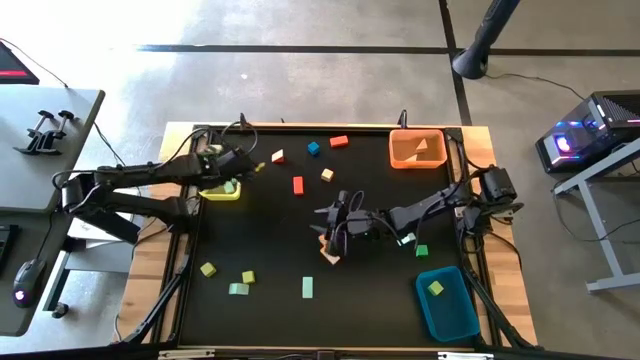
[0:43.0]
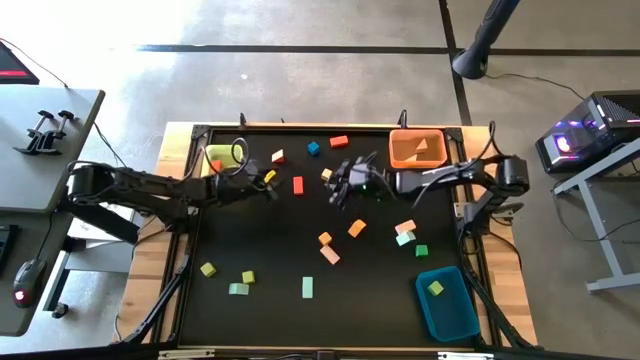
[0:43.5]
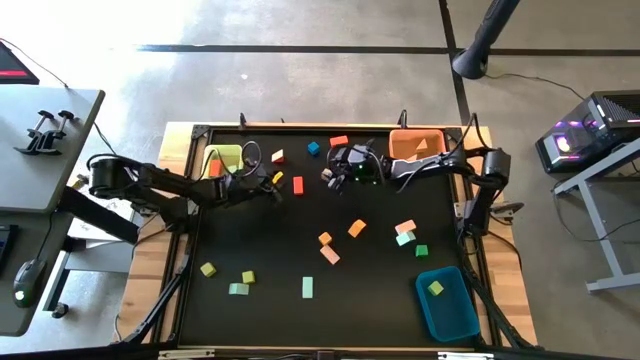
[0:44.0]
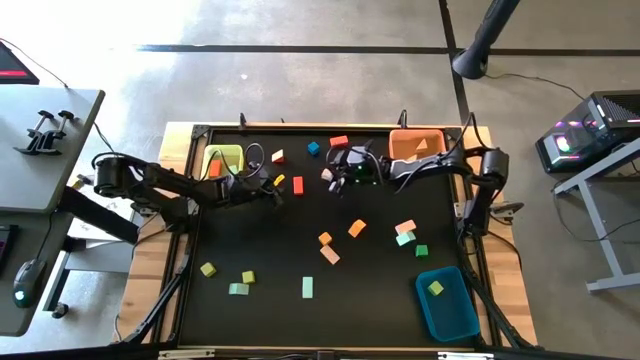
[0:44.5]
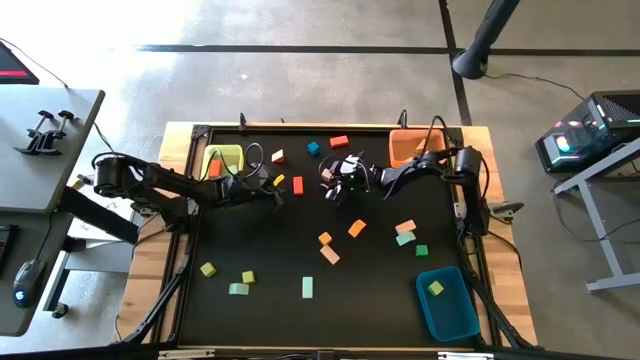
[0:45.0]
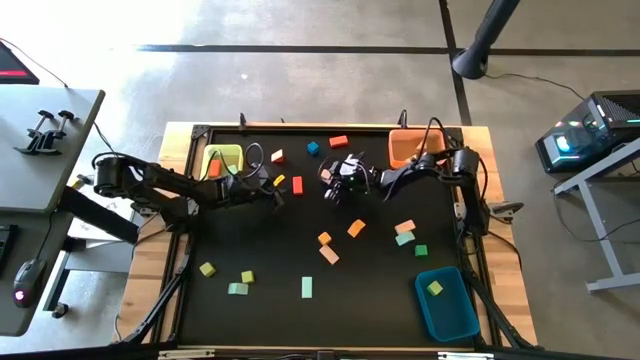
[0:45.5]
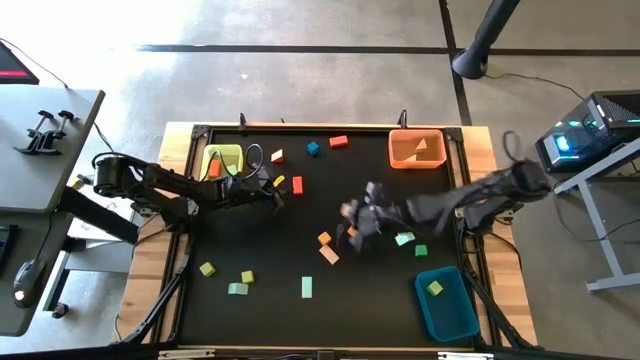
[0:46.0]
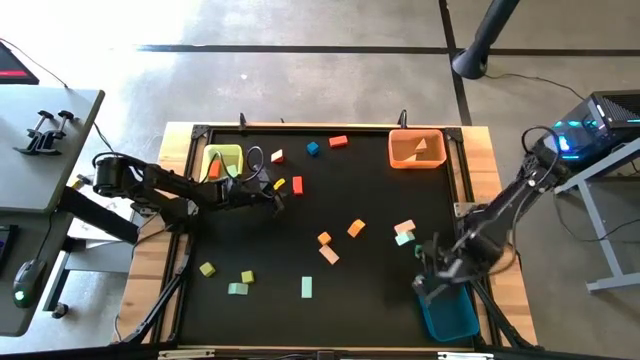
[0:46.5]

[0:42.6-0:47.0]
Task: Sort blocks by size
Put the light orange square block into the blue bin

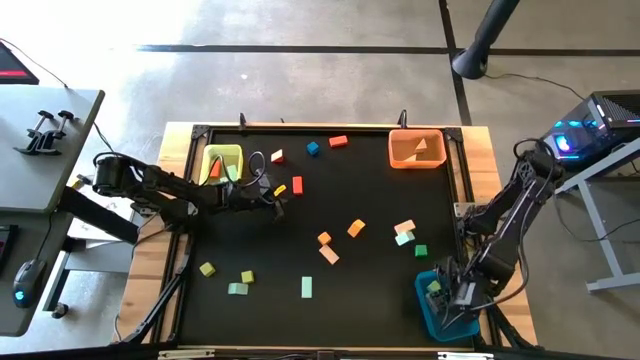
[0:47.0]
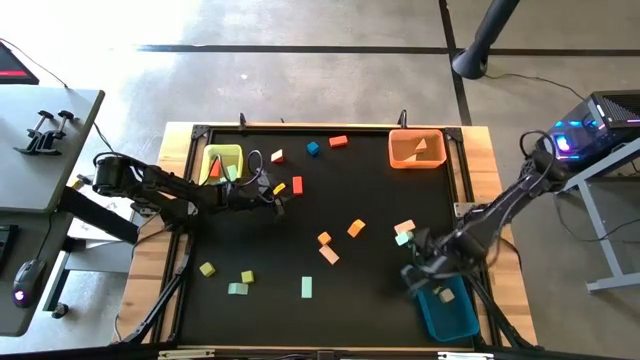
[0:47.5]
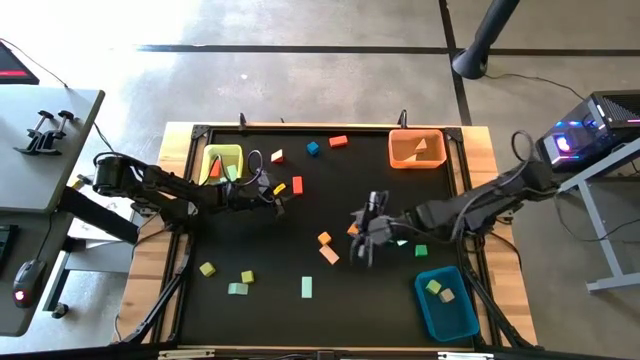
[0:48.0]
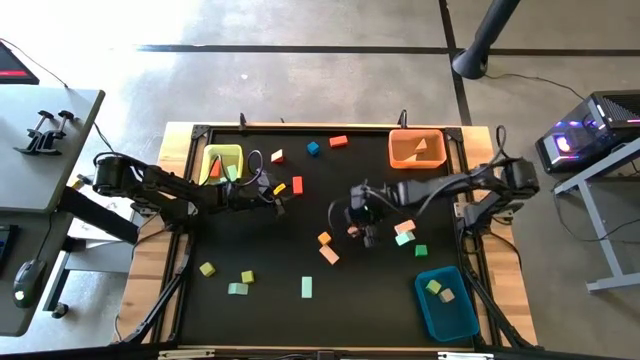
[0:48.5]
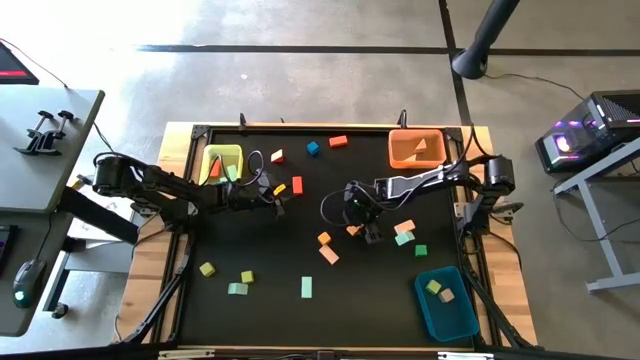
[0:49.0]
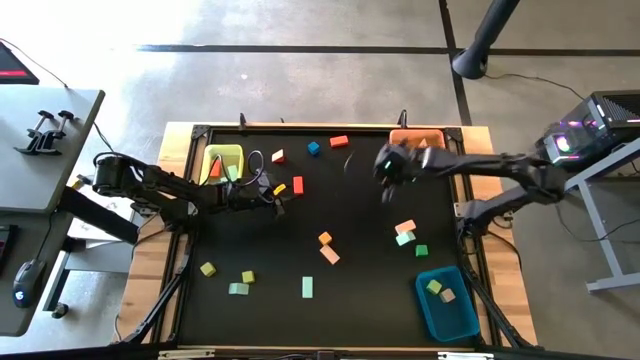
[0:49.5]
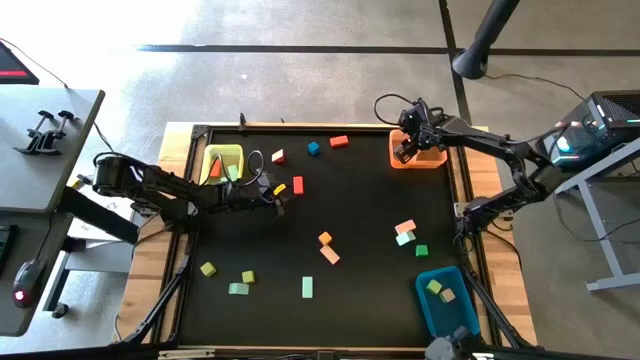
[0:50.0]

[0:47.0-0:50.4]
Put the orange triangular block into the orange bin

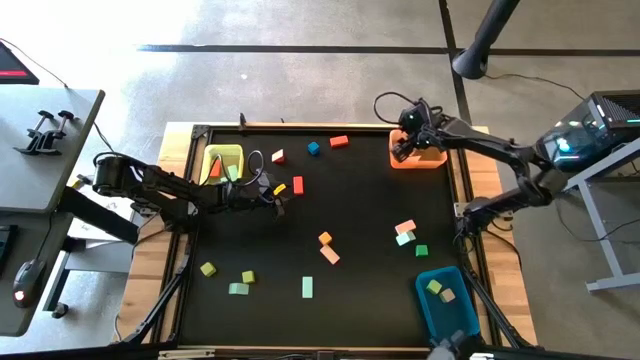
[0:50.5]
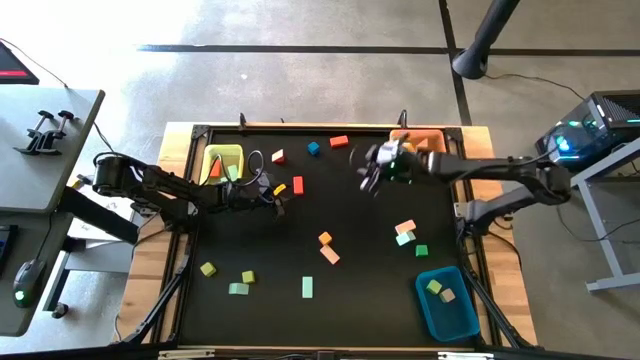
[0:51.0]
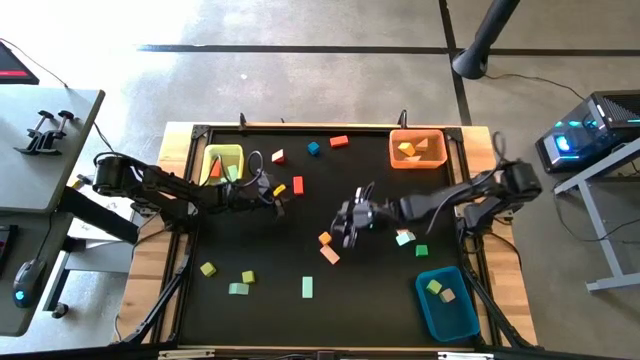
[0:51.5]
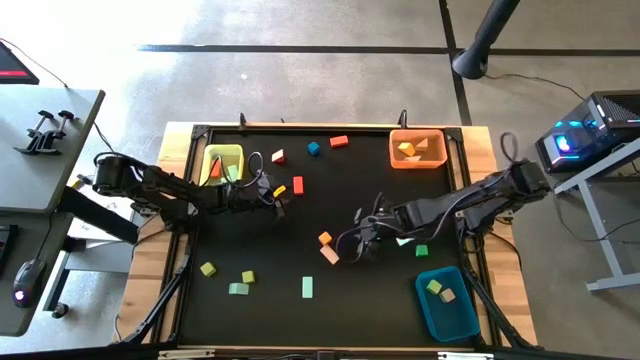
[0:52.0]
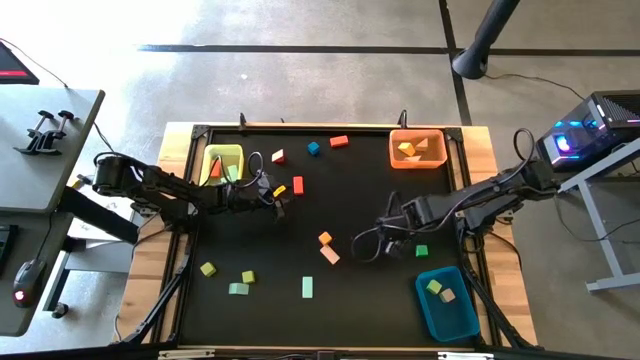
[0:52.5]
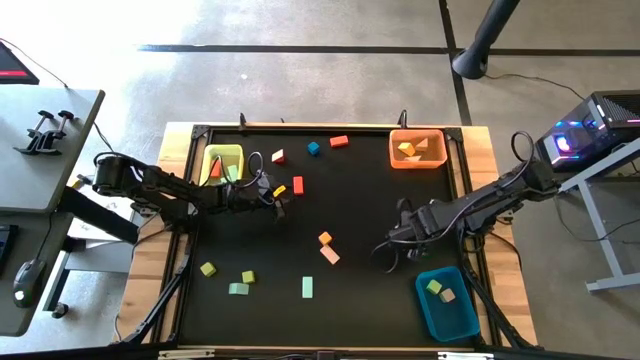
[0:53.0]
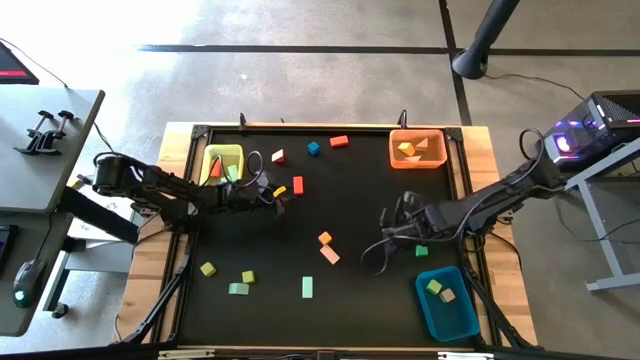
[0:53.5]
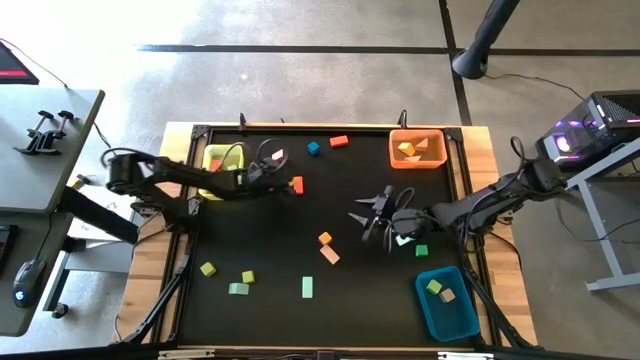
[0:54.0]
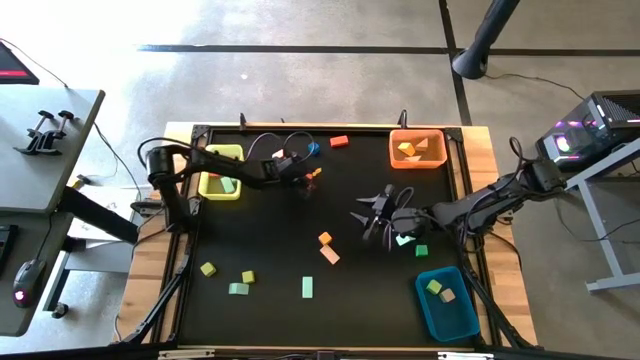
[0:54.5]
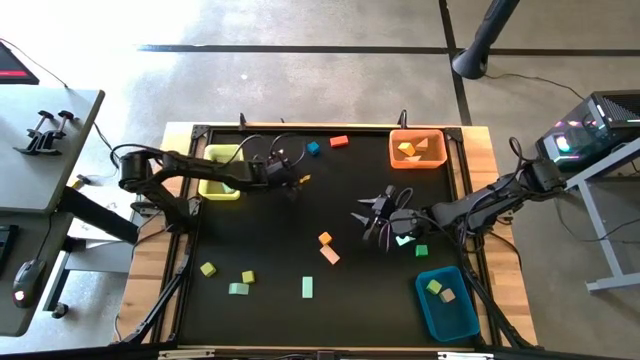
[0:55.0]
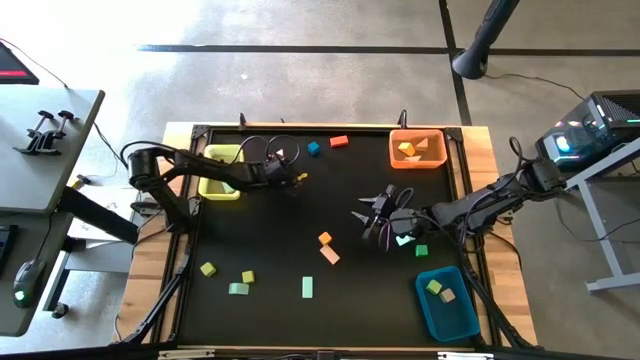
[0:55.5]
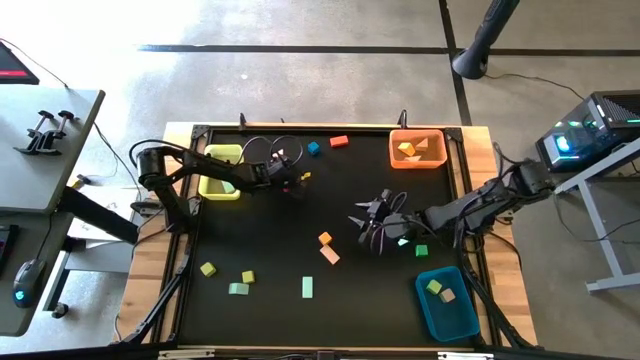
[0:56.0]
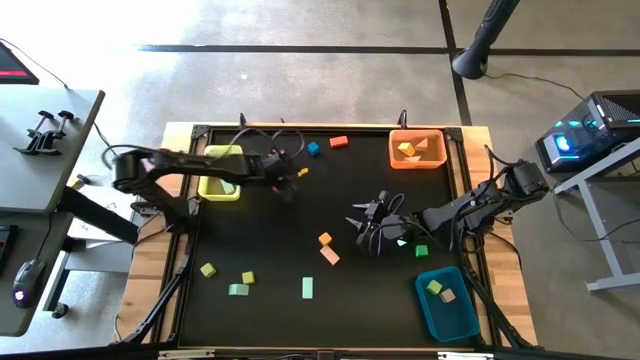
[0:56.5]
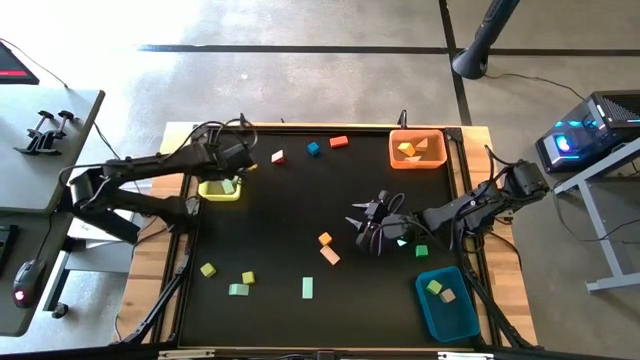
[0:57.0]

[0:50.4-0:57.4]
Put the orange rectangular block into the yellow bin

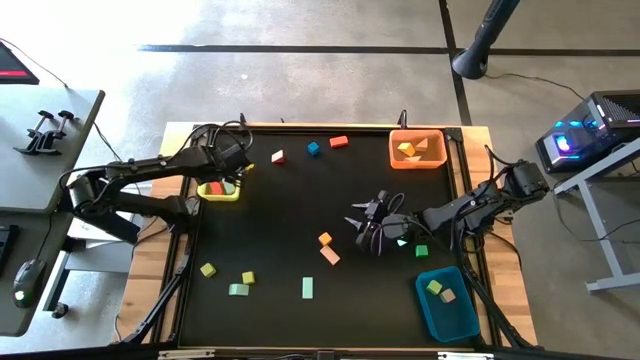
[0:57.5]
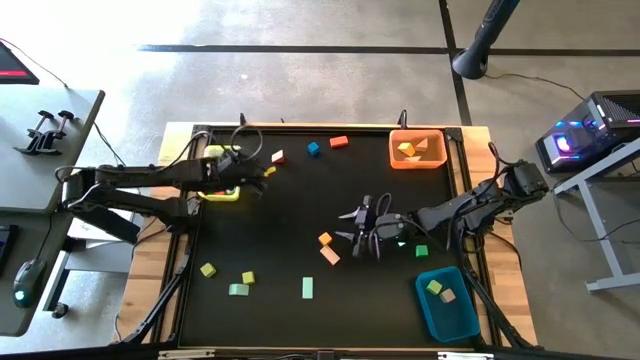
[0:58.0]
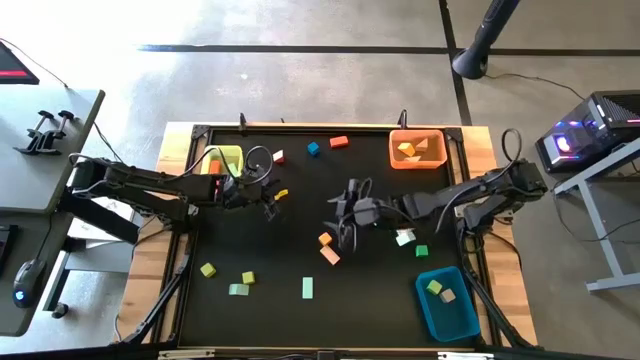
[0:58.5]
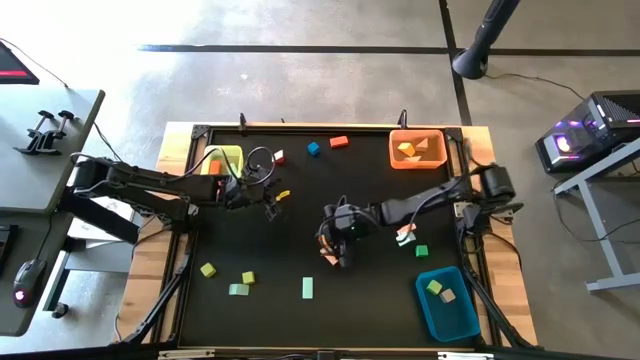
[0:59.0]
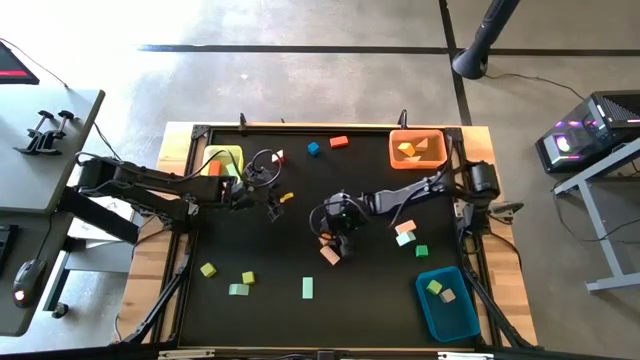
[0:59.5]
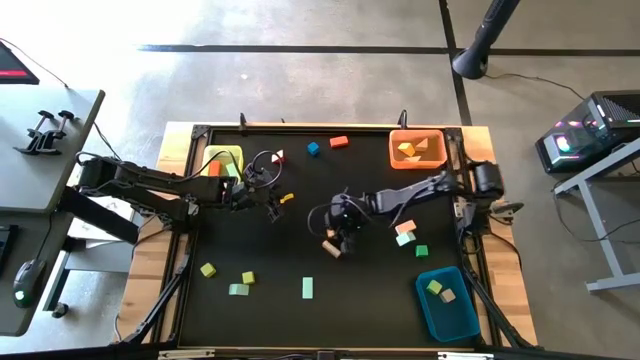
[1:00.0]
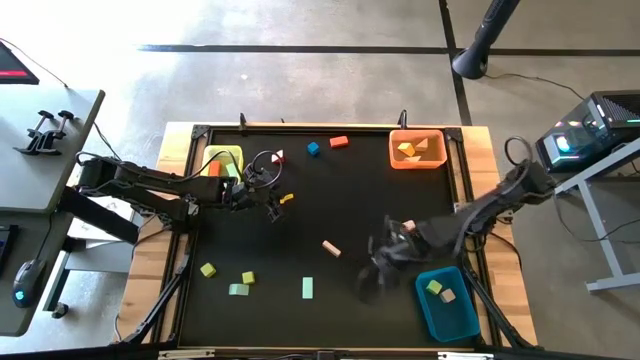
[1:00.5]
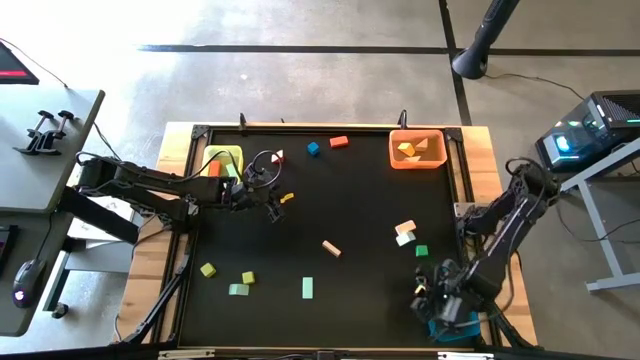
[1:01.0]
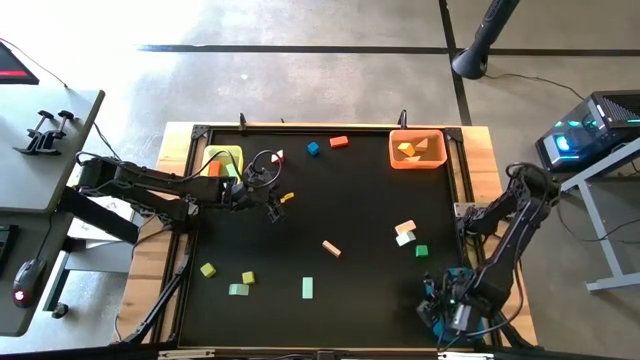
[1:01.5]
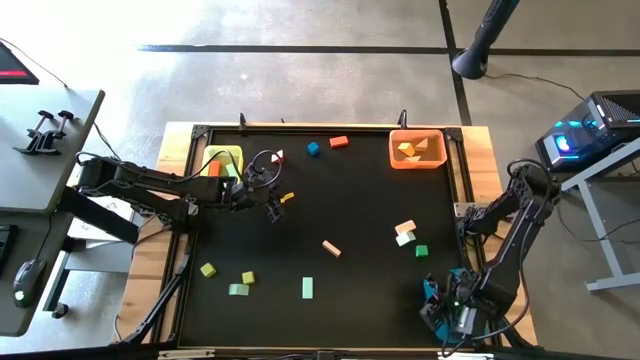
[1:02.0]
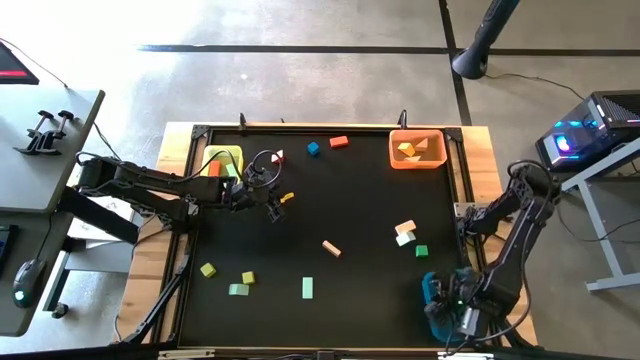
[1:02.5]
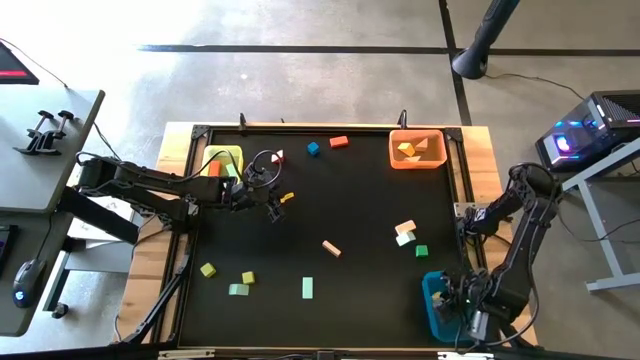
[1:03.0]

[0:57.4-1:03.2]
Put the light orange square block into the blue bin
